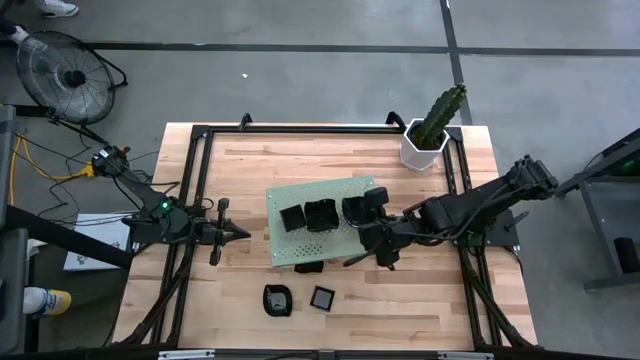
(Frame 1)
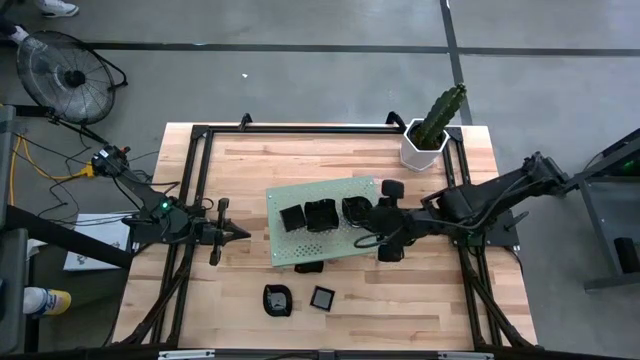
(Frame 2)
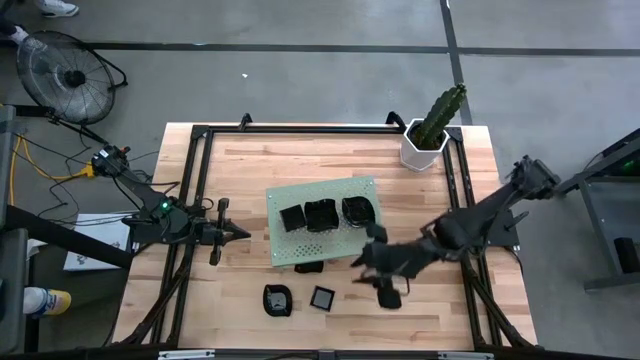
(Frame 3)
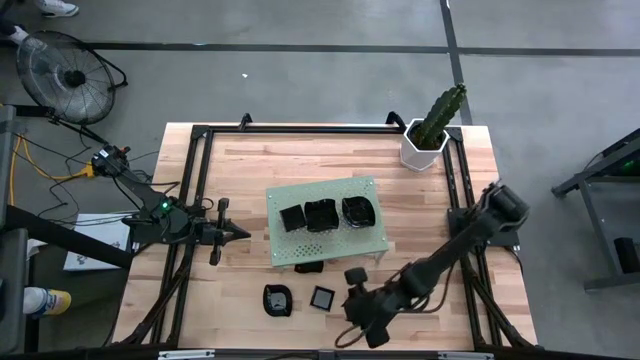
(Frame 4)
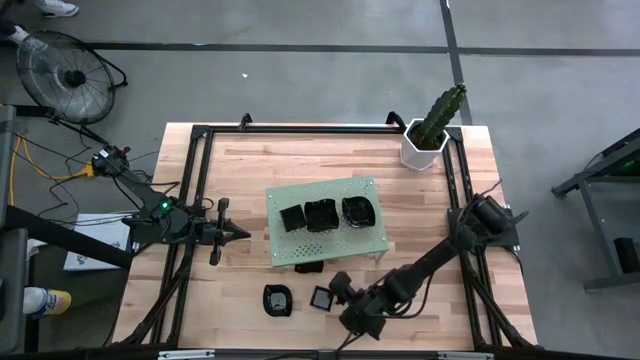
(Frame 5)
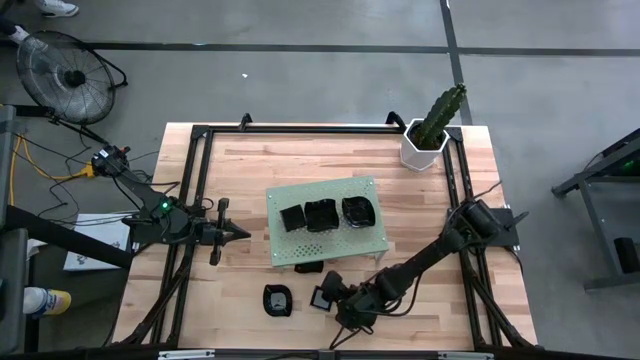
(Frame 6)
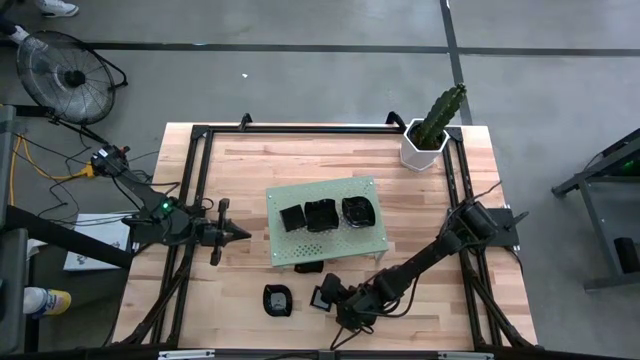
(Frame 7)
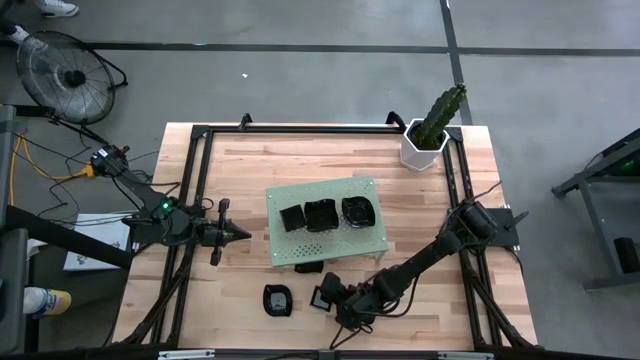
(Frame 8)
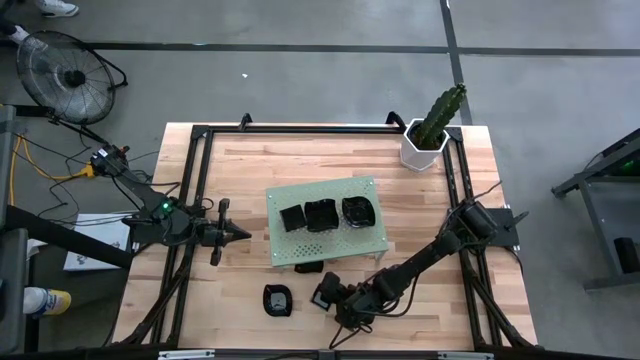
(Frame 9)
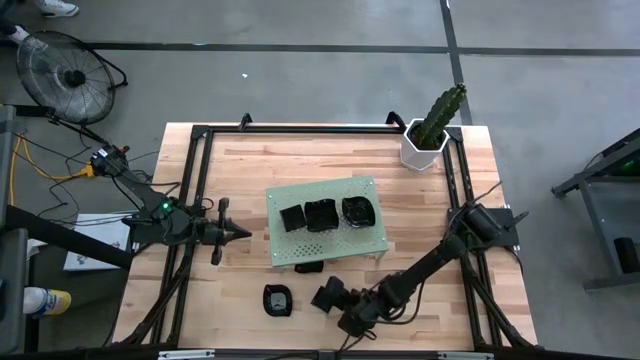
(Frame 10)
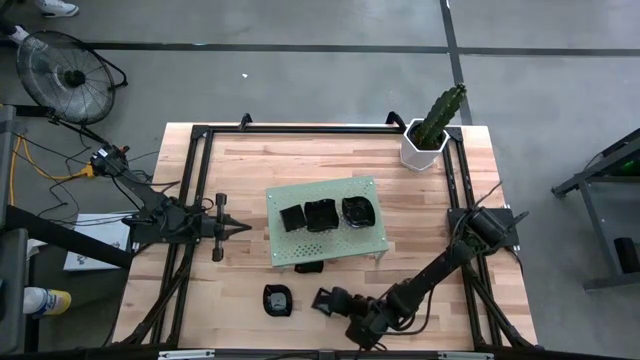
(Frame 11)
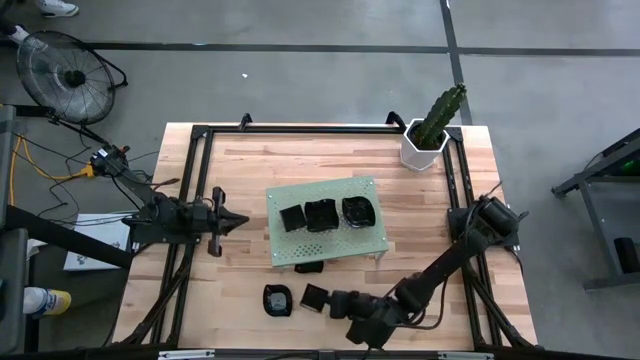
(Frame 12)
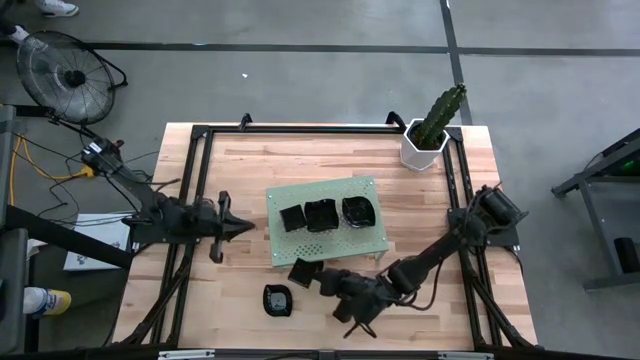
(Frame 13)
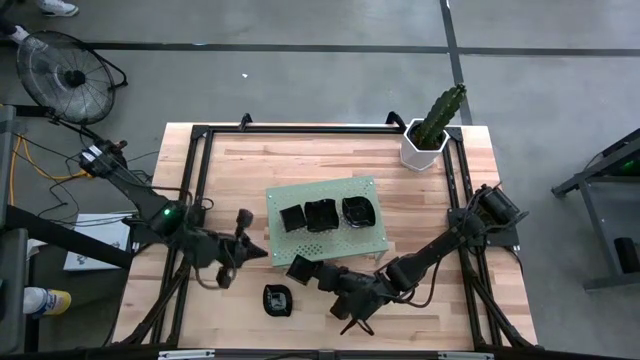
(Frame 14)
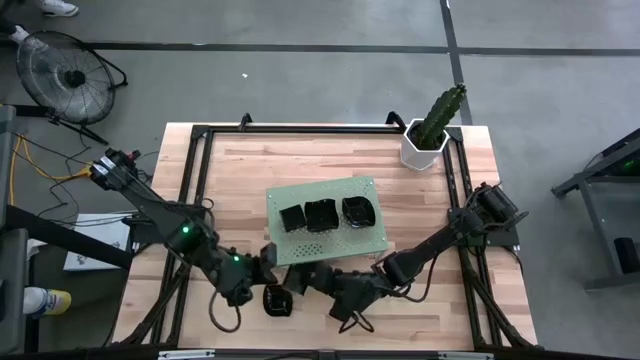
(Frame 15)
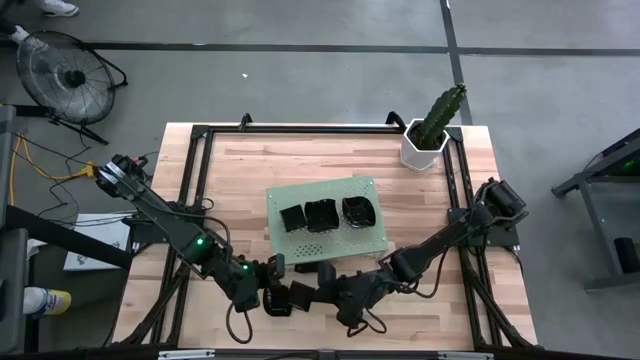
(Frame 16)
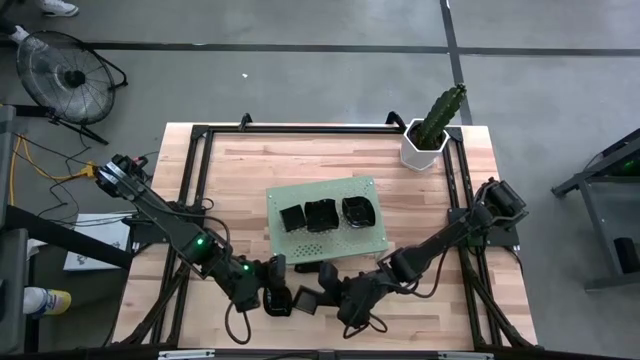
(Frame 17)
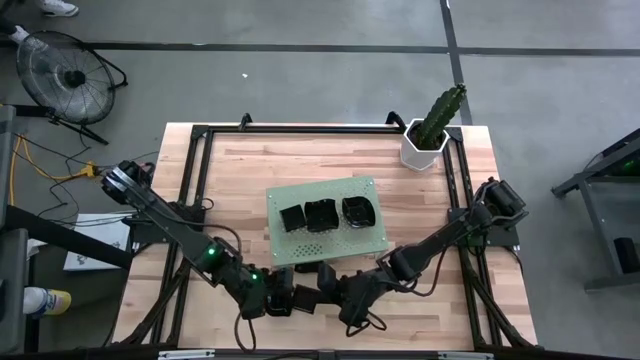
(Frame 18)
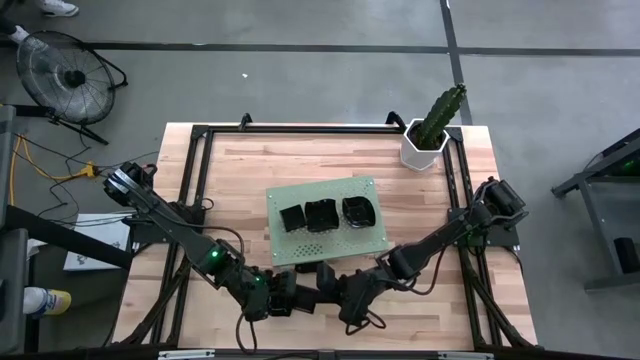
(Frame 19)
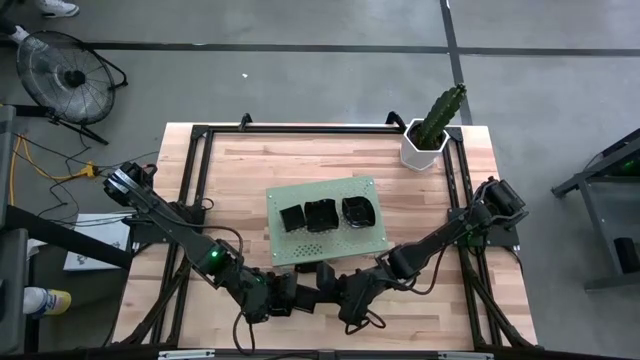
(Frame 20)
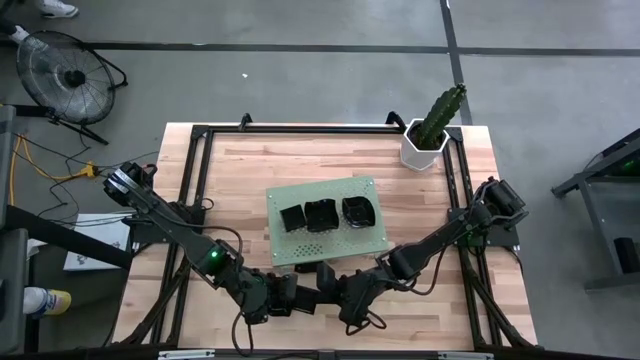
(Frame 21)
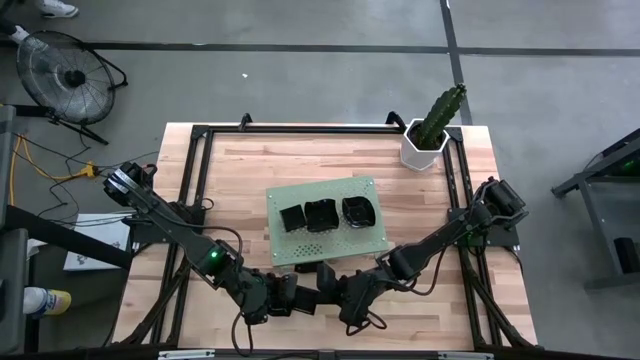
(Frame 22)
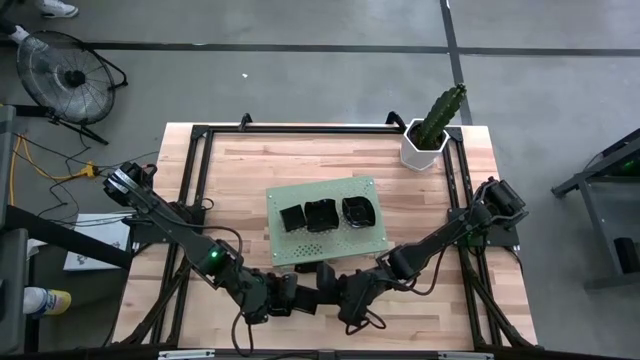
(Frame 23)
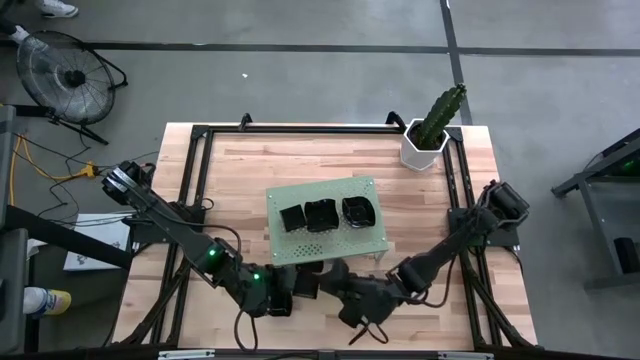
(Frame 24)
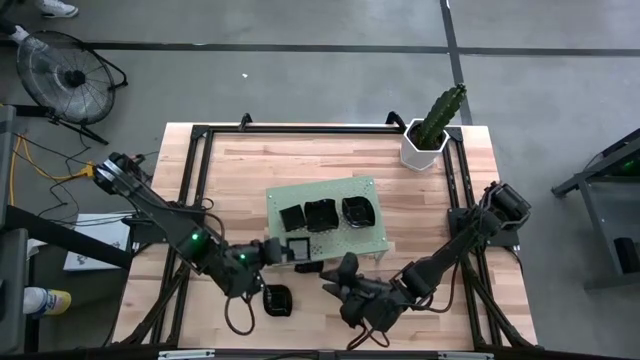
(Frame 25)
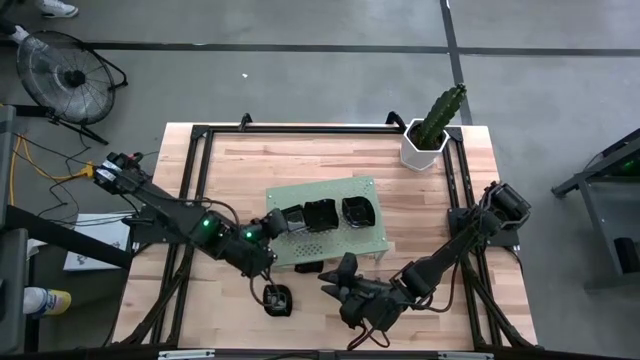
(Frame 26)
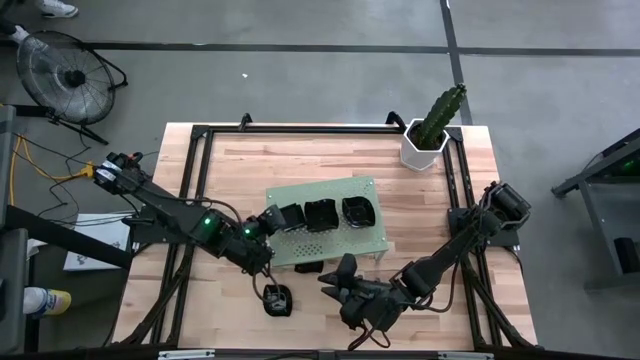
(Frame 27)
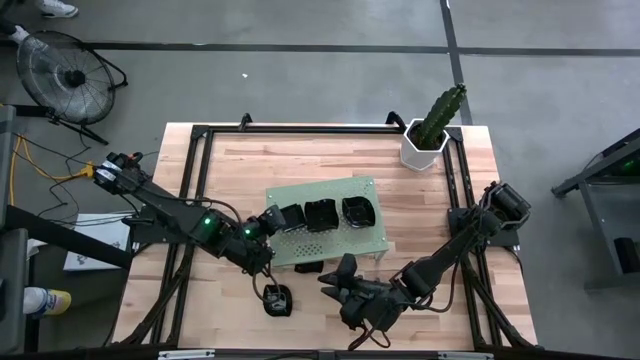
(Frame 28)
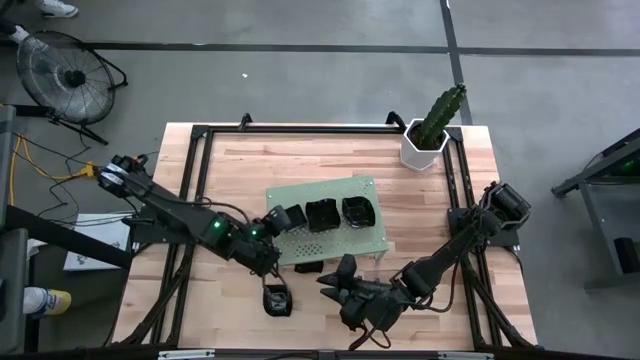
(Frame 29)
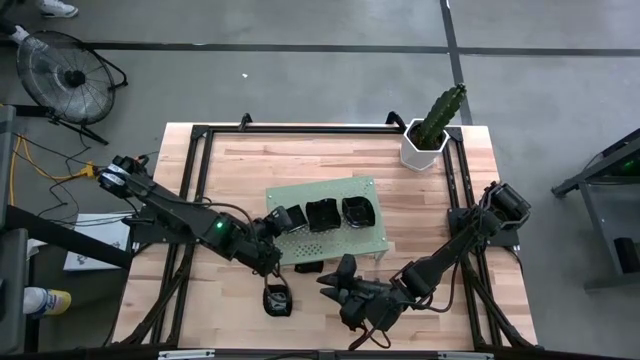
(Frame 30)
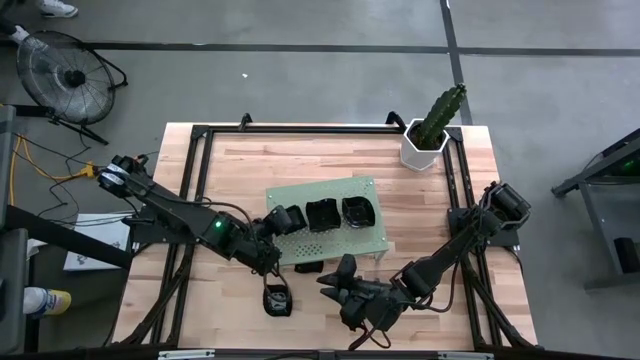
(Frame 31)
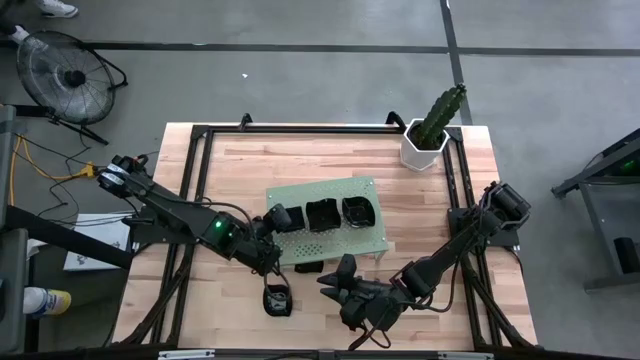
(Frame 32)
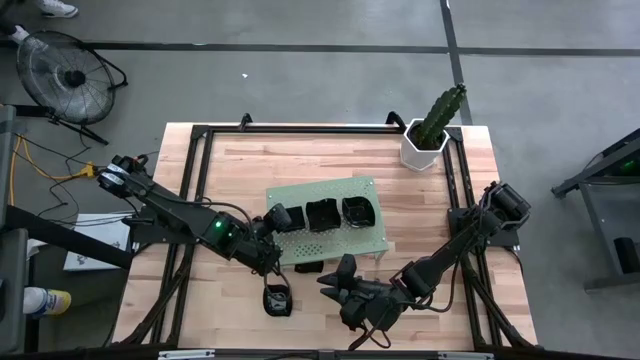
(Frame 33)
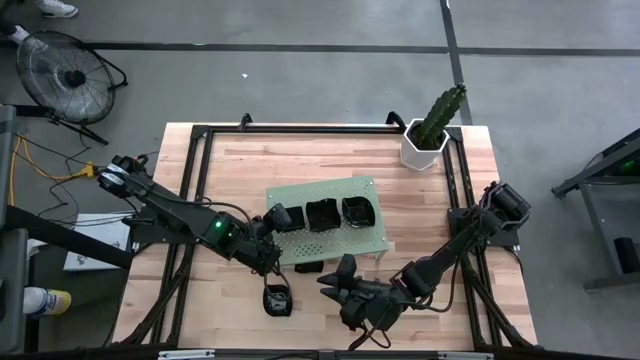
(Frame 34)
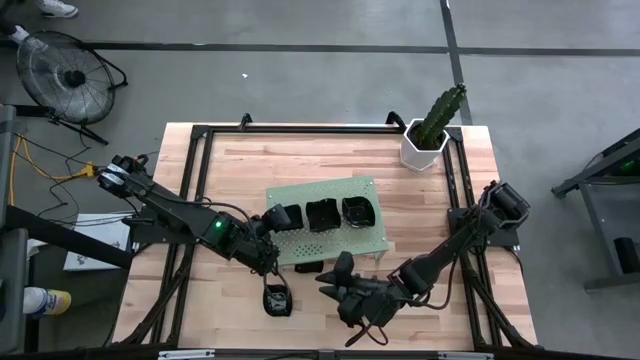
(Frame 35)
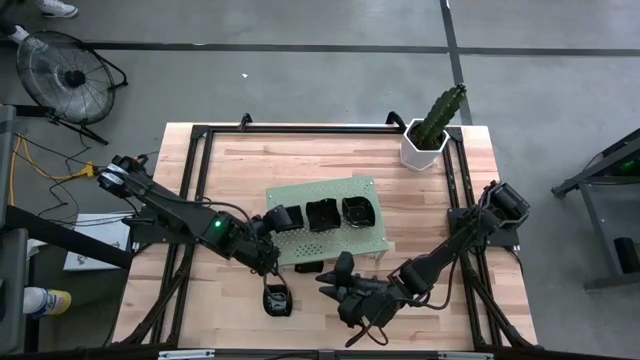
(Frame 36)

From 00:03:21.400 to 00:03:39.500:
Task: Pick & Place Mini shaped plates
Stack the black square shaped plate on top of the black square shaped plate on the shelf

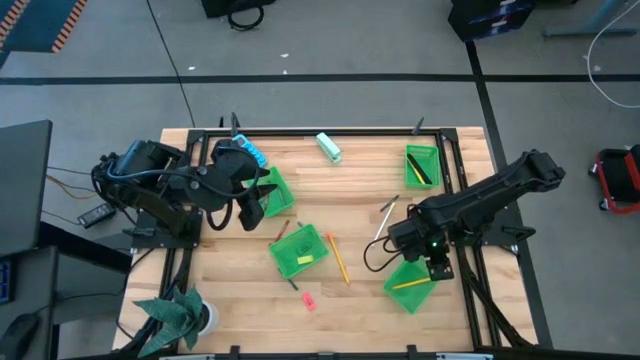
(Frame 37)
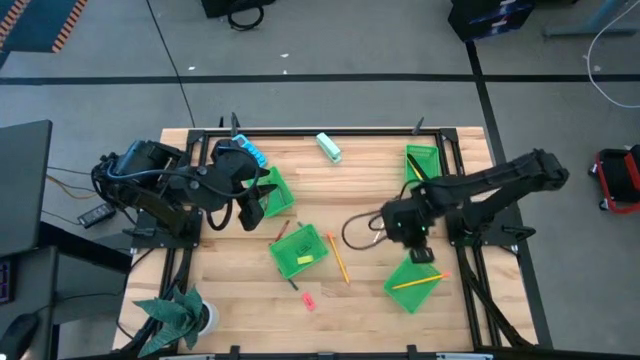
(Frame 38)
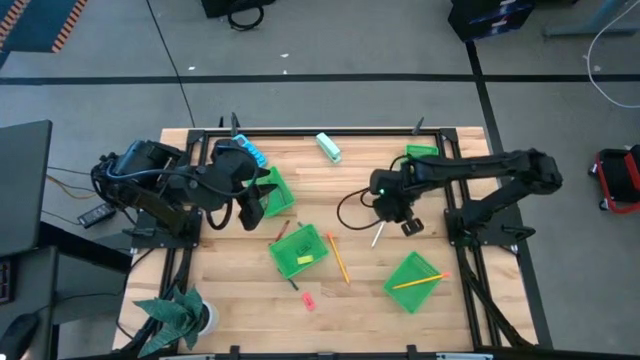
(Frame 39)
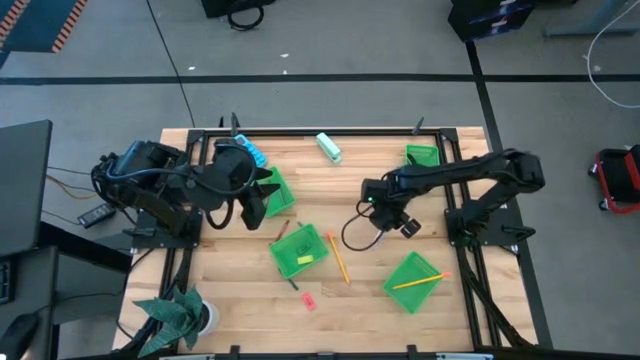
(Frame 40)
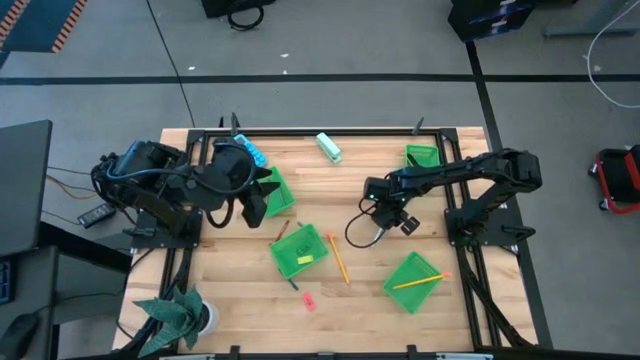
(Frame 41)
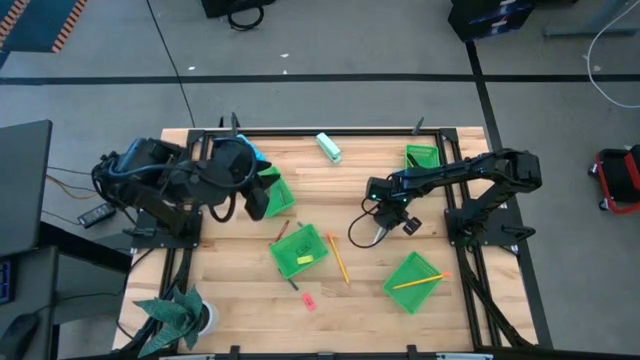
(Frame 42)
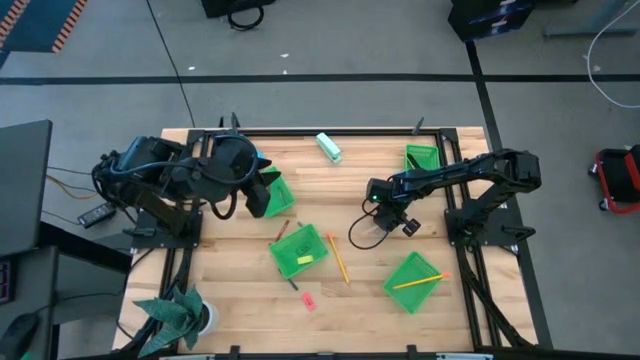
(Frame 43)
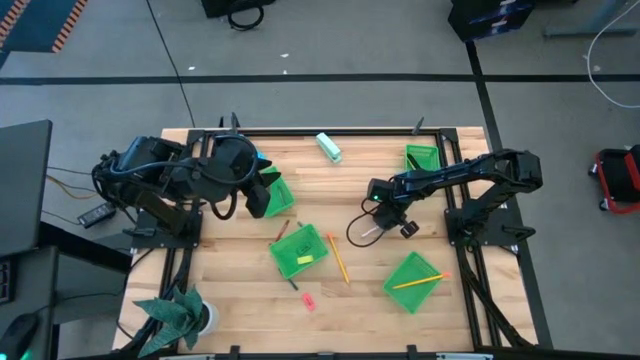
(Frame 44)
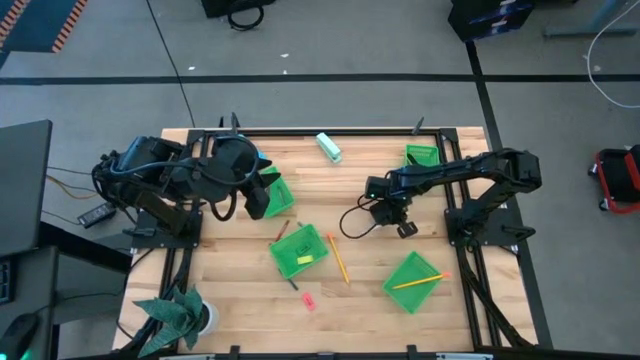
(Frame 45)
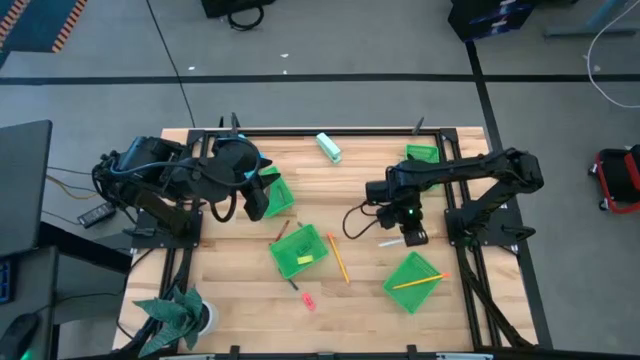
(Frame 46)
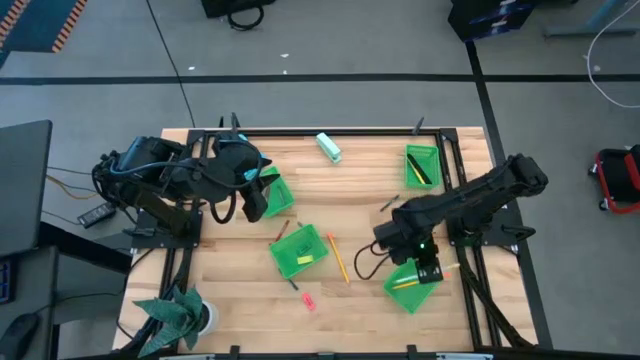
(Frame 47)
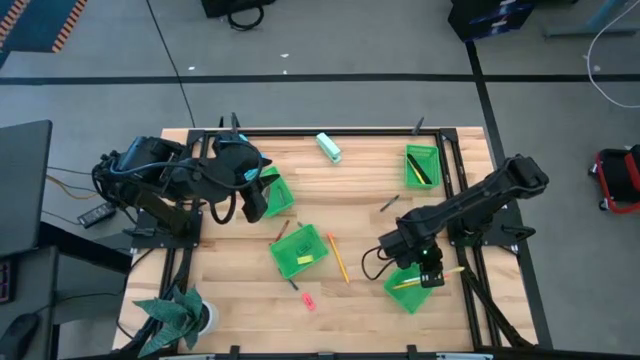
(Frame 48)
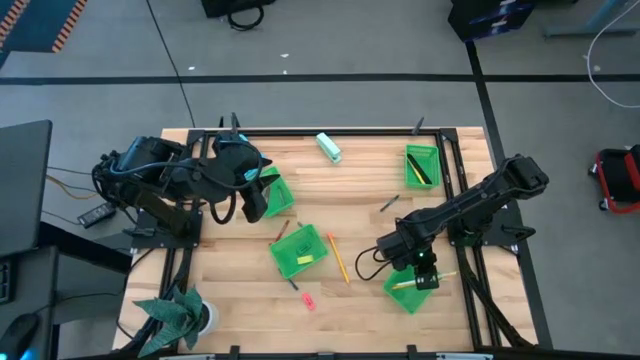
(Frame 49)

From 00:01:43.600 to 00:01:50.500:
Task: Sort crayons/erasers/pens/pencils in bins
Put the white pencil into the bottom right green bin
